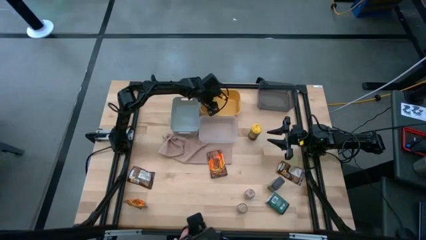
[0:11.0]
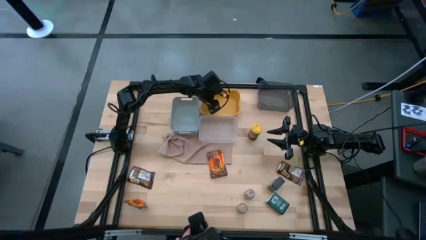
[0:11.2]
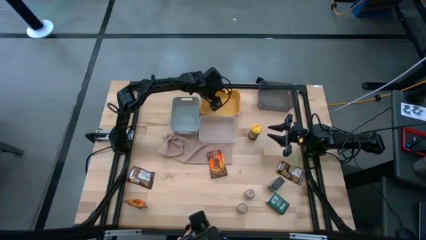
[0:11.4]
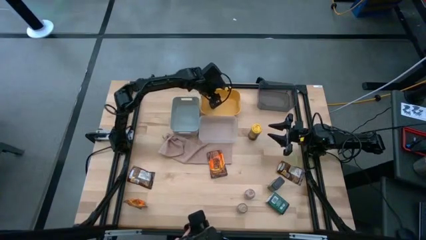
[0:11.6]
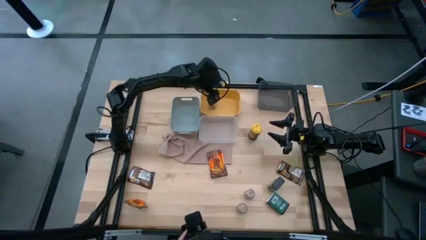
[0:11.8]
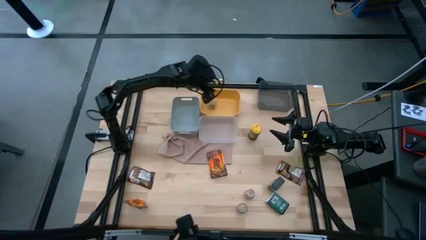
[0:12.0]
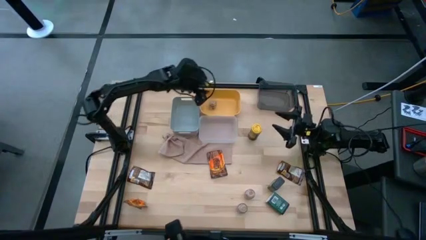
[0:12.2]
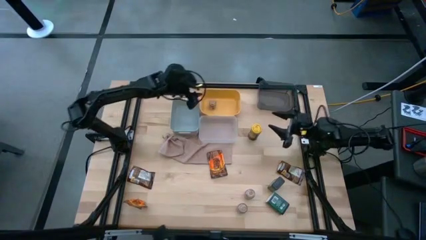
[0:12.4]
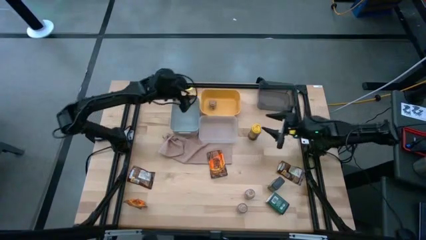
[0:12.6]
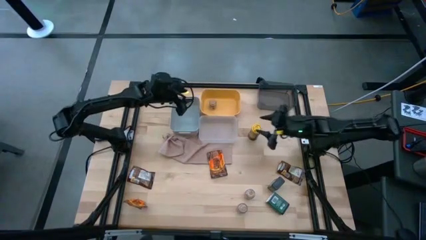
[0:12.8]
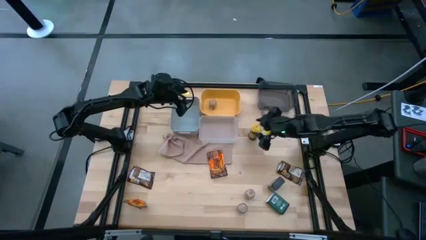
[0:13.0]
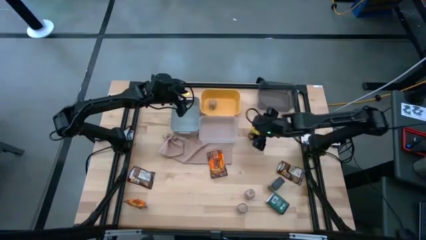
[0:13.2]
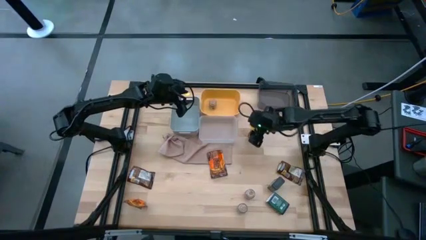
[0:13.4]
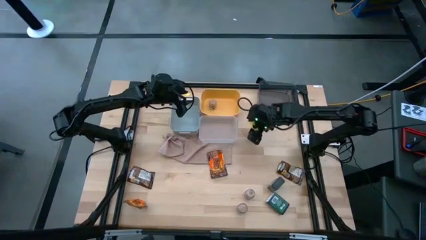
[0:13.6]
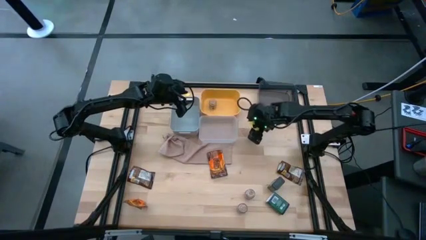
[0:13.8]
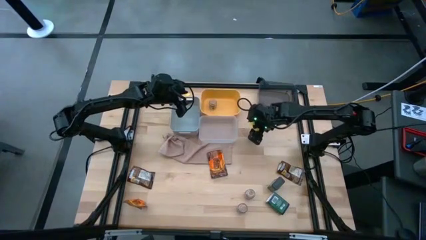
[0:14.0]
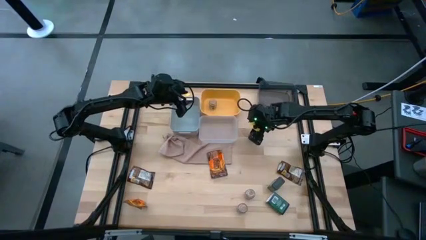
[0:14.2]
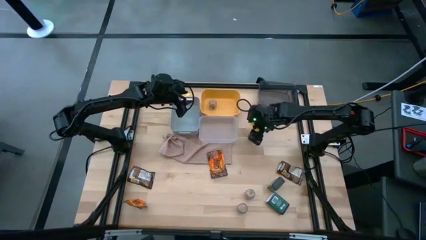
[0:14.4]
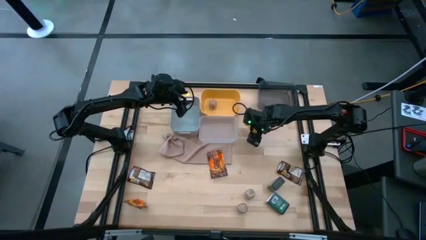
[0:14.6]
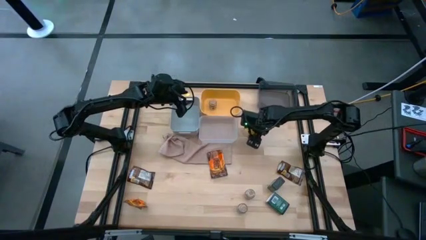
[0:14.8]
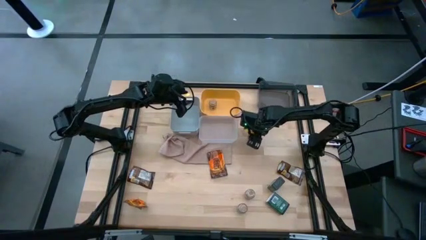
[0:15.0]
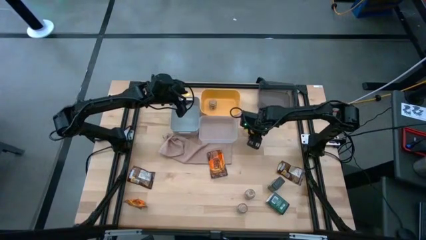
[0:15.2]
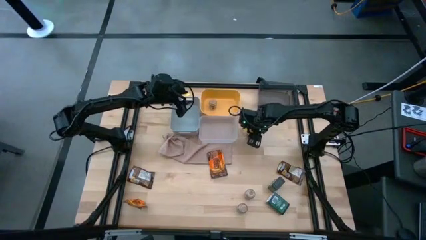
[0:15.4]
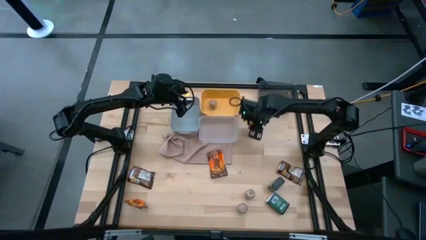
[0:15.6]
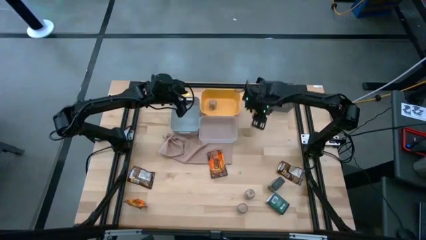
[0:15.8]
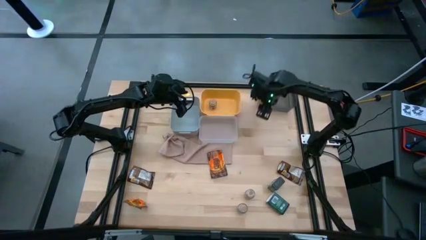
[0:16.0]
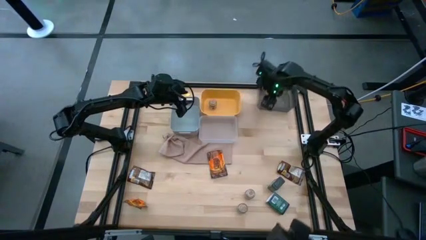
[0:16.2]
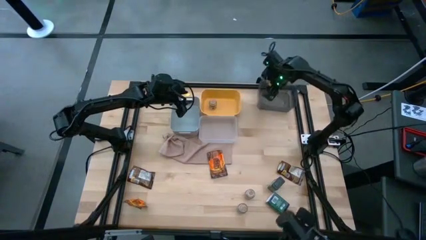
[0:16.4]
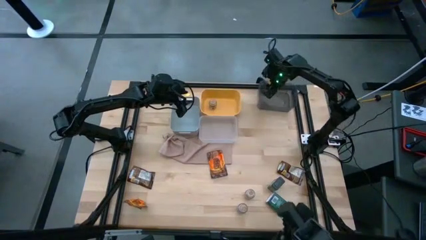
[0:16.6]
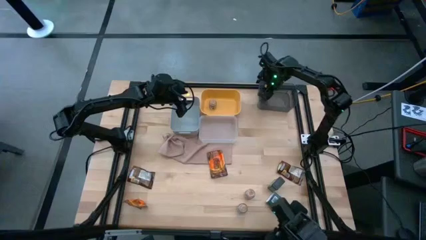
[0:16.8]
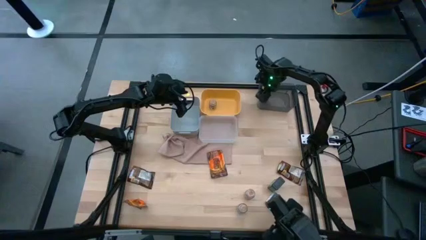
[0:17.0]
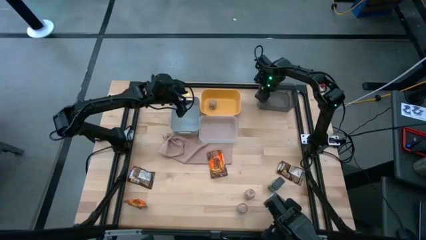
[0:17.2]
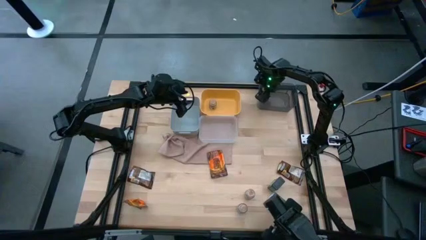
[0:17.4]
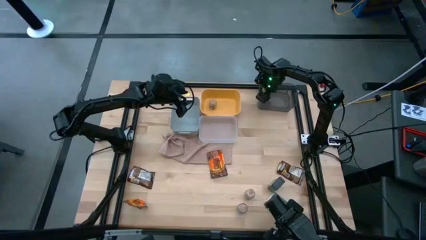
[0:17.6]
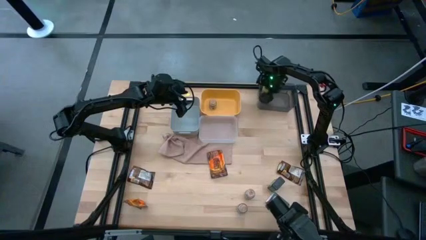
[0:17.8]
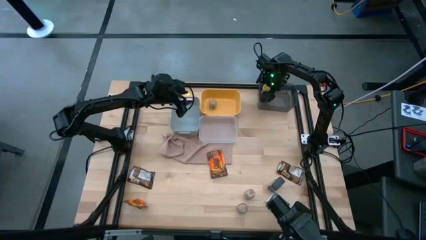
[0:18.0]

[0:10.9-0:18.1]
Task: Sort spices by type
Put the yellow seasoning can into the black bin

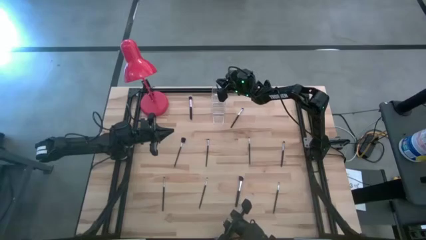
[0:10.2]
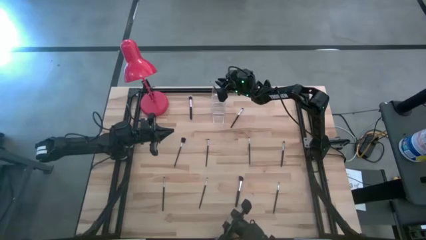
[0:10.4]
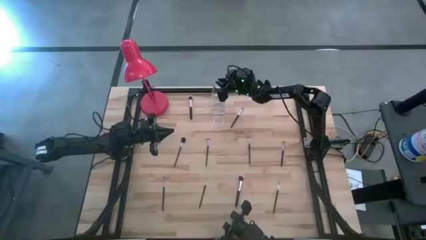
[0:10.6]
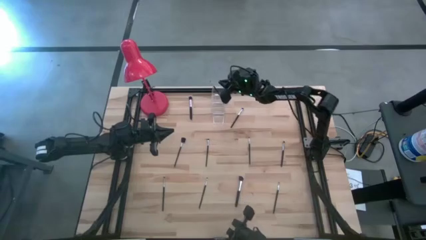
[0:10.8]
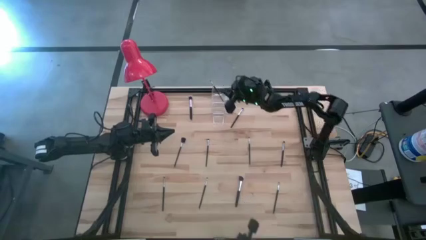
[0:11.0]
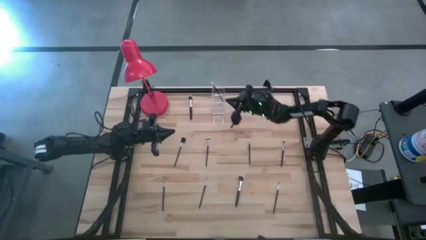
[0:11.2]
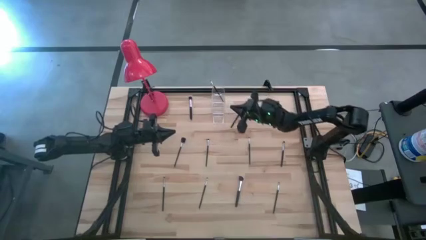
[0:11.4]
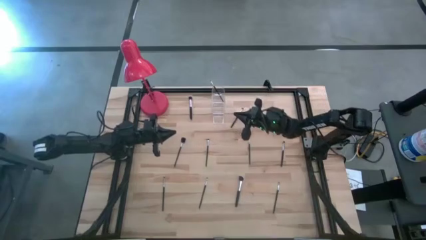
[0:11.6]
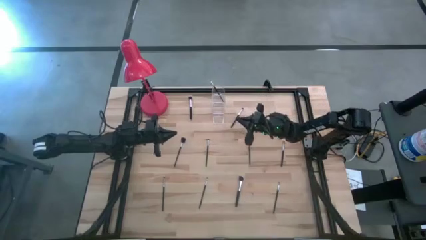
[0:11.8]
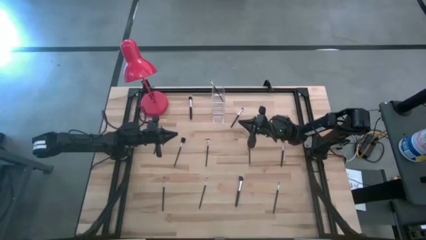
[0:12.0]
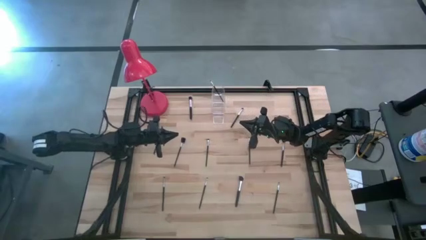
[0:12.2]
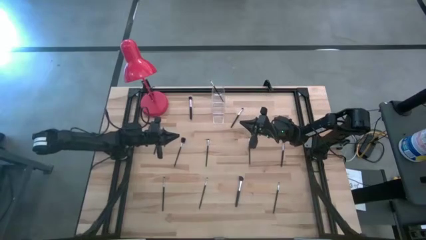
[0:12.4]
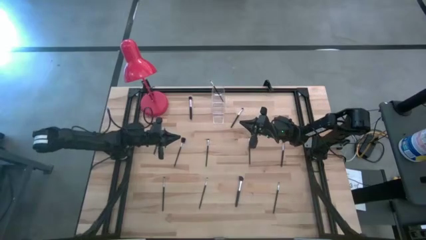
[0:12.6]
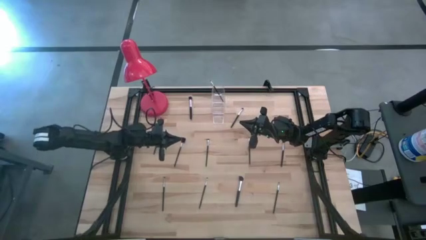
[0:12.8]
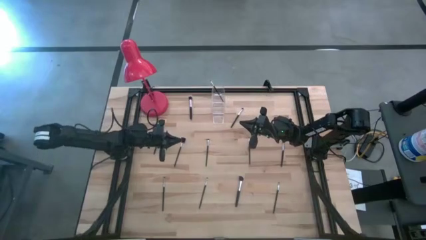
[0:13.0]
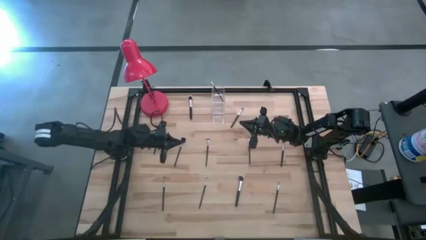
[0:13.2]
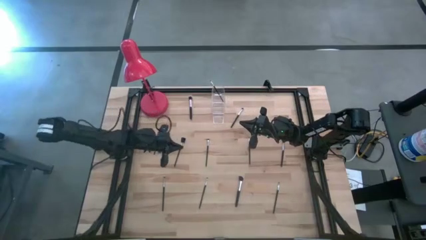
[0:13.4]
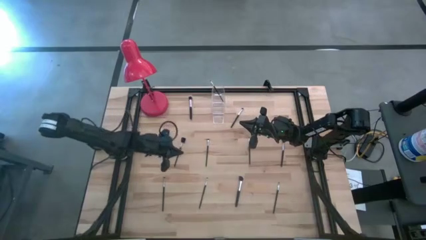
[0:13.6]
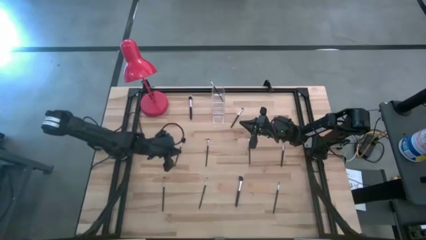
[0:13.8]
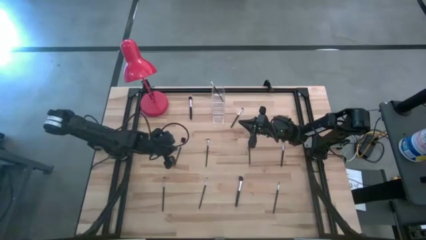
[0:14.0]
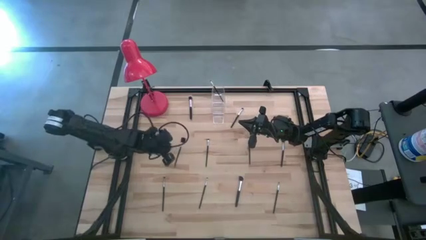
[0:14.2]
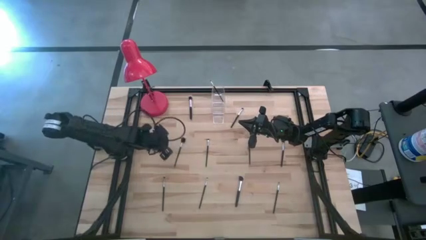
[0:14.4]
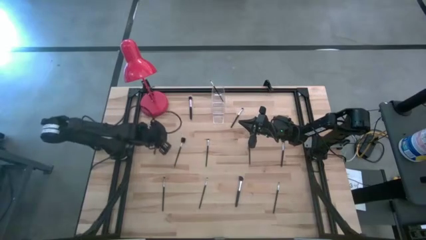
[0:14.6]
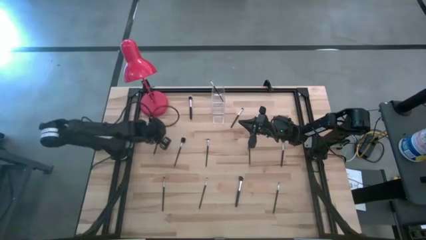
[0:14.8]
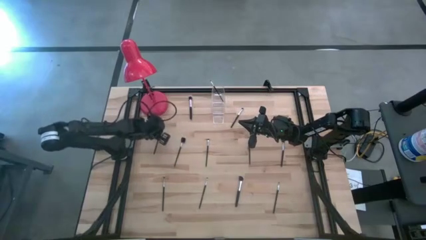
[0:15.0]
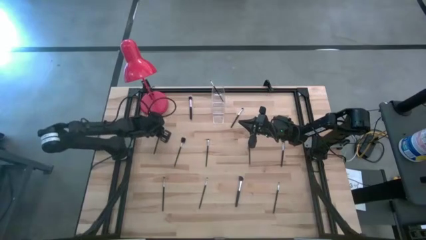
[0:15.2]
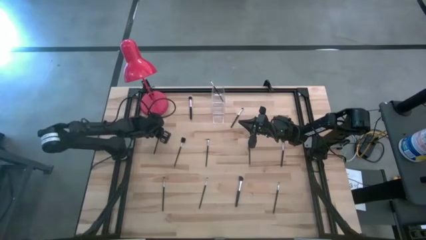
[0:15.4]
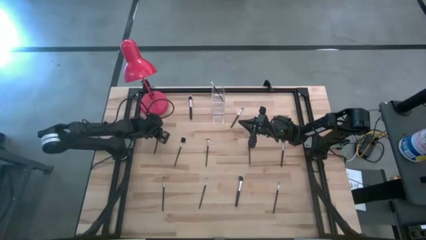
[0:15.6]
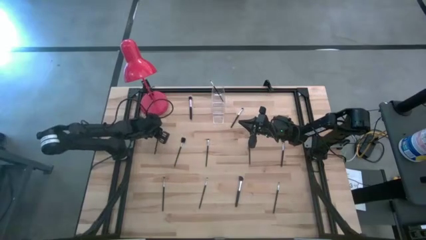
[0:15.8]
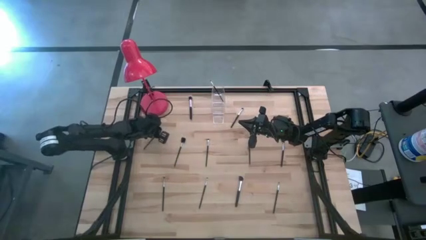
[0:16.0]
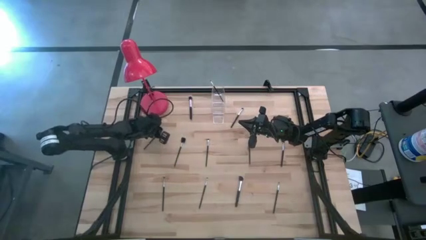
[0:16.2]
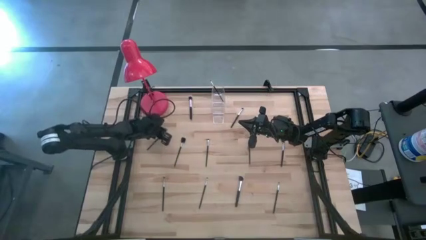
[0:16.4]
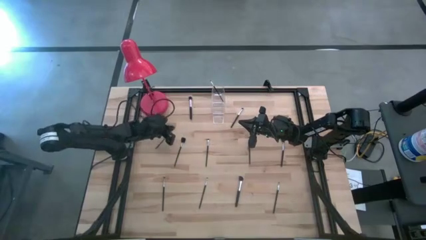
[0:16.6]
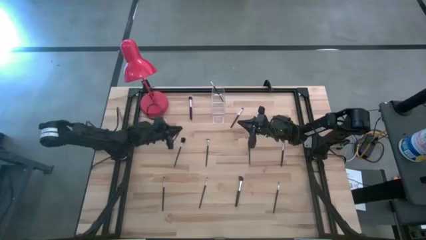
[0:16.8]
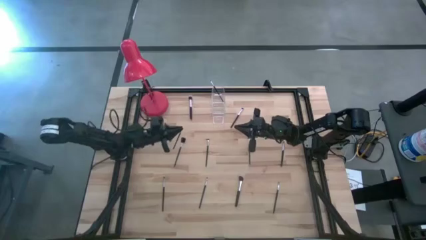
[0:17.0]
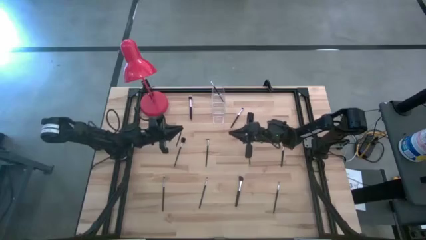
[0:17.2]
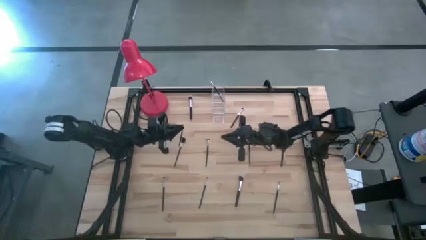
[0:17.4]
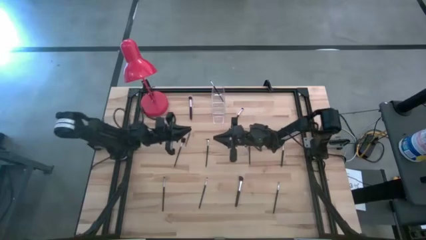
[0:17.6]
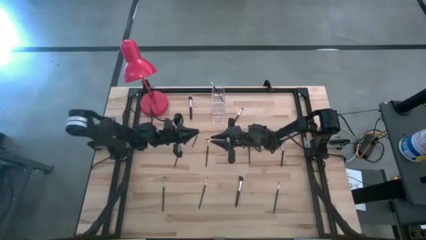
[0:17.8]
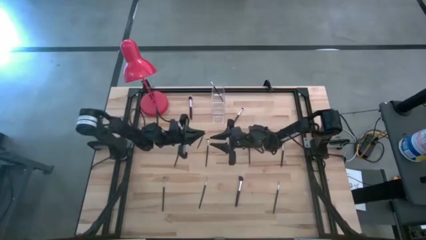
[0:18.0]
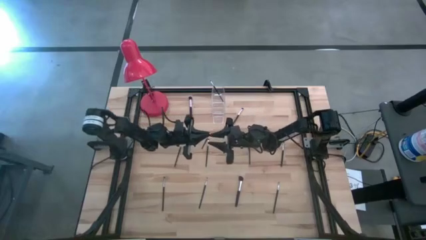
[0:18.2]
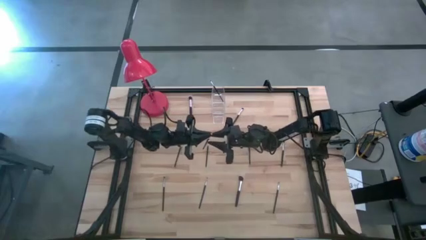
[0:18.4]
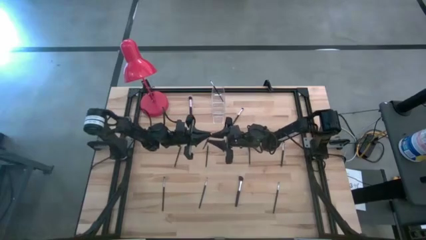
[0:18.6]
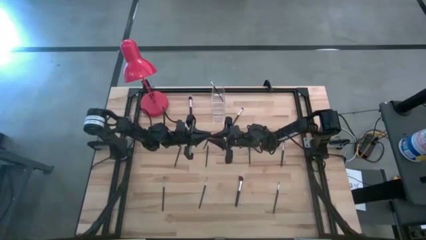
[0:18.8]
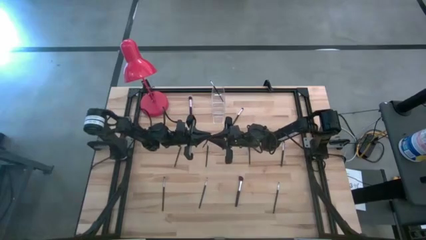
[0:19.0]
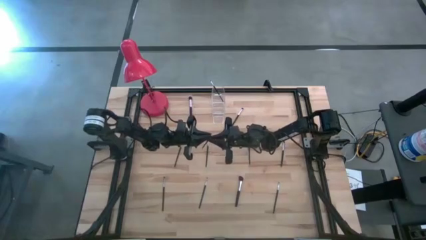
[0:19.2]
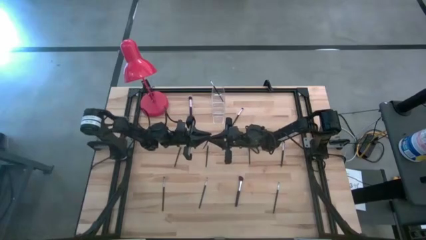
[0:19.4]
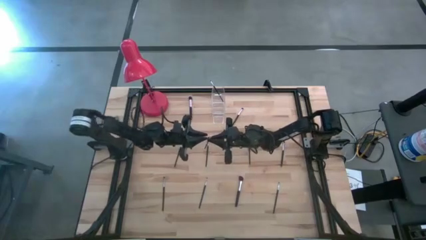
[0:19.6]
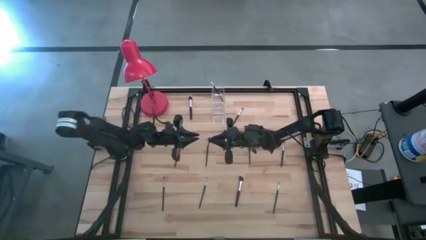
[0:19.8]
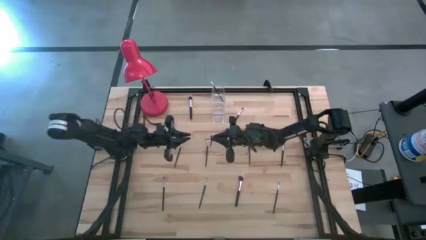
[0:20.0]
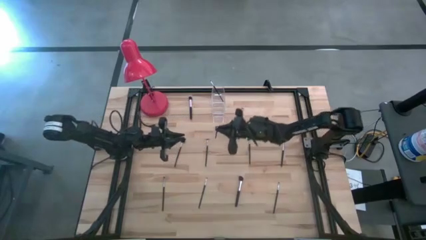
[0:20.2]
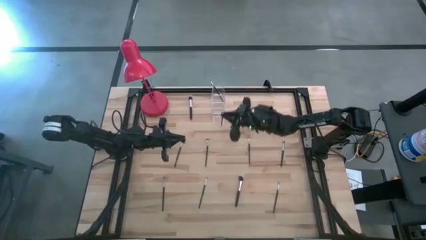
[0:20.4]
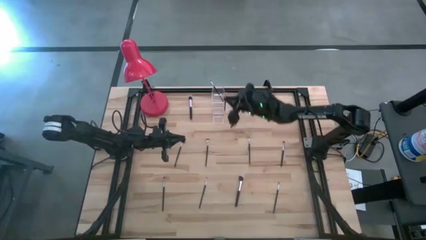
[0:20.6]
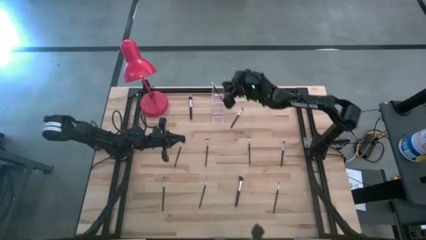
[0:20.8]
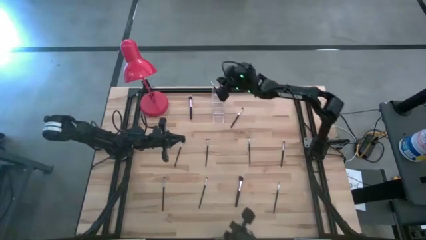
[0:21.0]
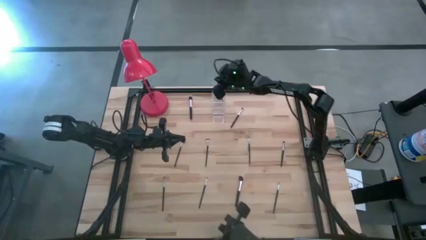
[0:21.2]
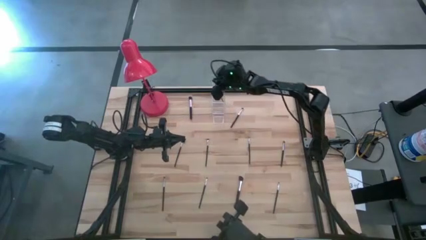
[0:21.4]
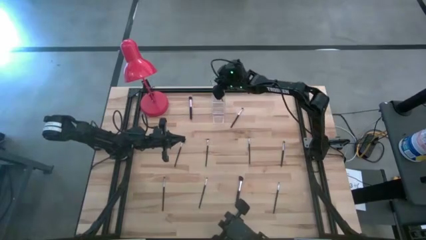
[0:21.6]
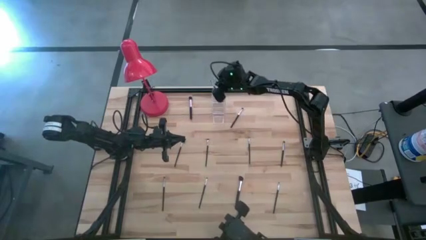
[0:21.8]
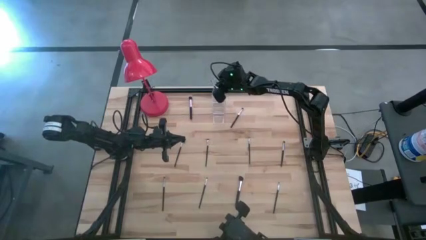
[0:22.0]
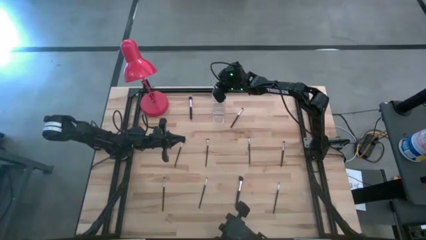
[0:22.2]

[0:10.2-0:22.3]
Task: Put items in baskets/containers
Put the black eyeshadow brush into the transparent organizer
